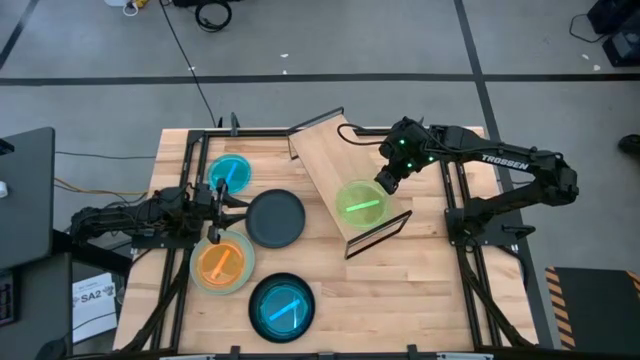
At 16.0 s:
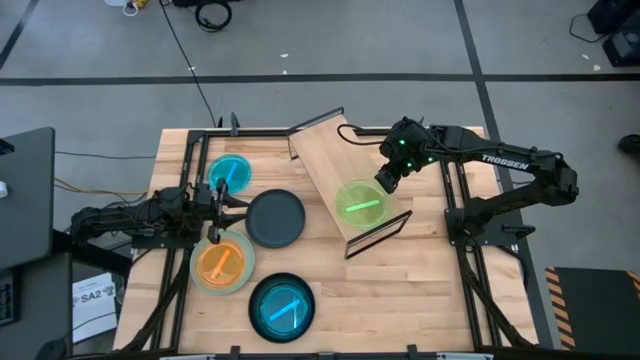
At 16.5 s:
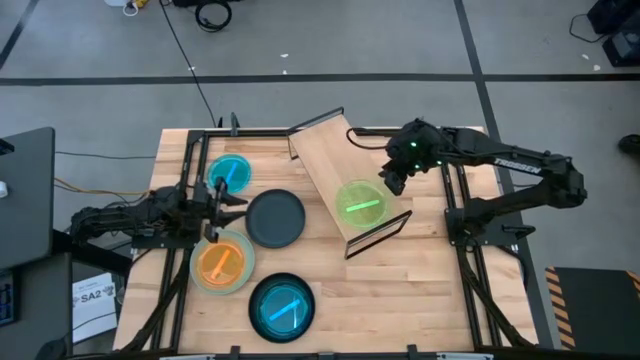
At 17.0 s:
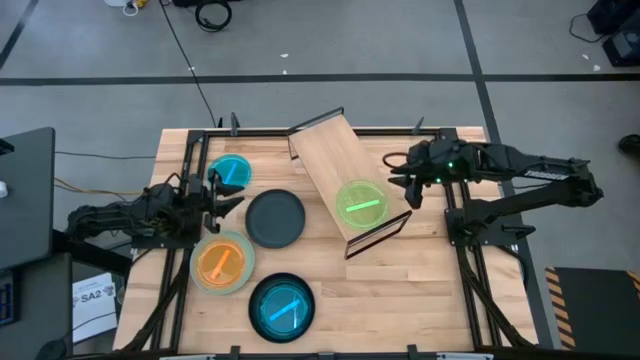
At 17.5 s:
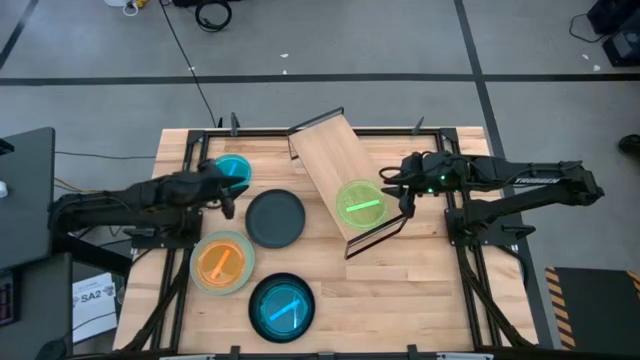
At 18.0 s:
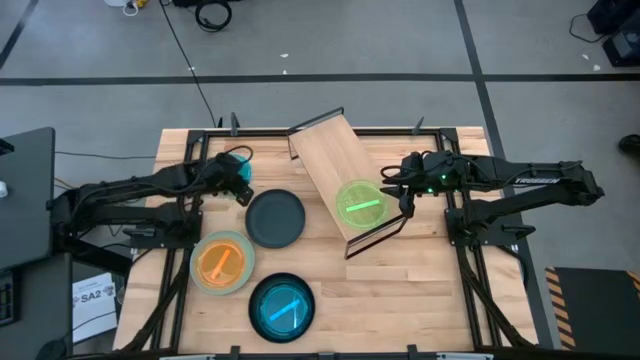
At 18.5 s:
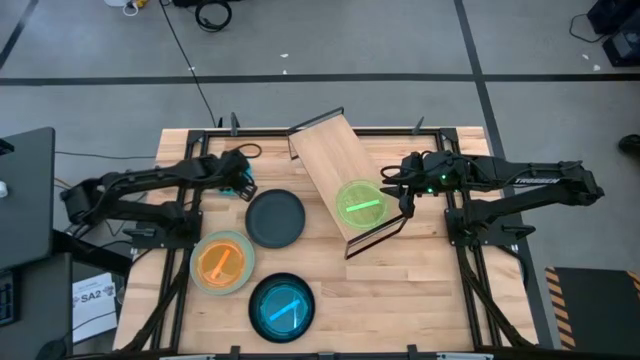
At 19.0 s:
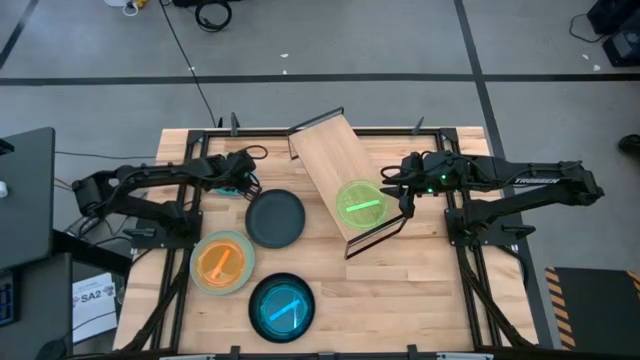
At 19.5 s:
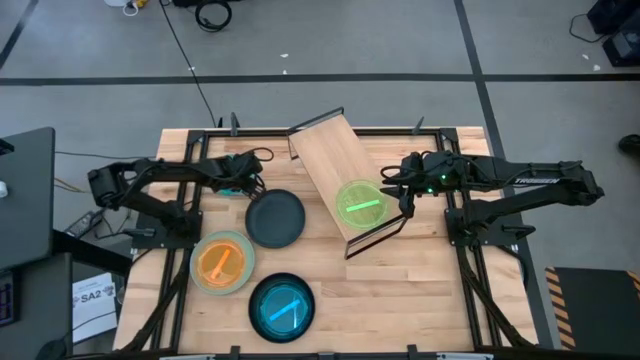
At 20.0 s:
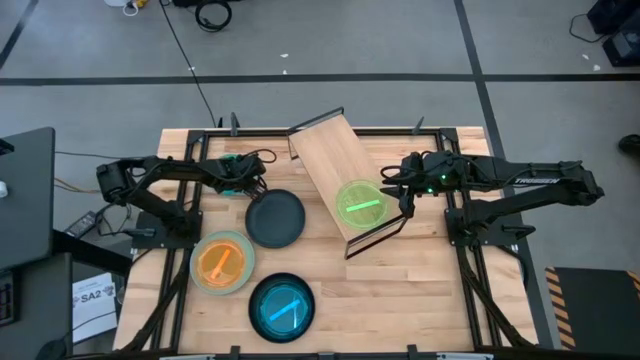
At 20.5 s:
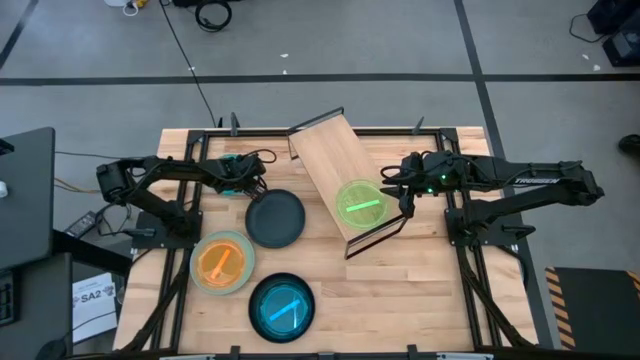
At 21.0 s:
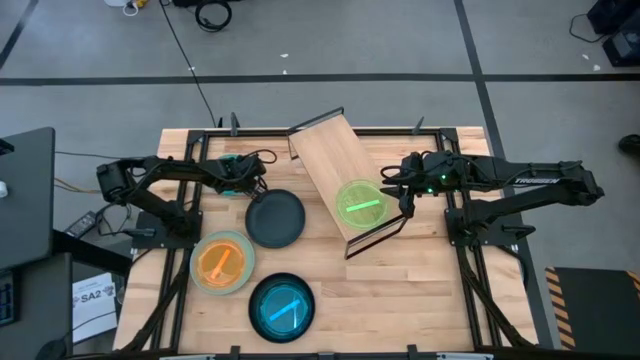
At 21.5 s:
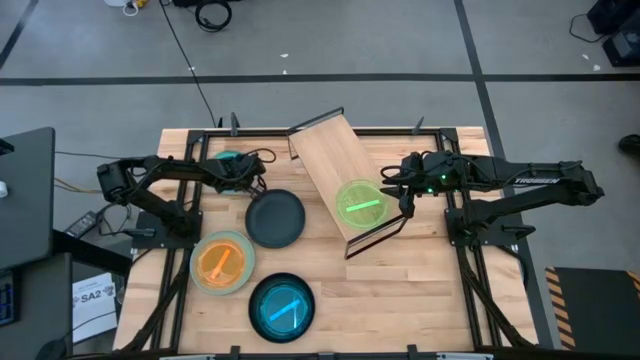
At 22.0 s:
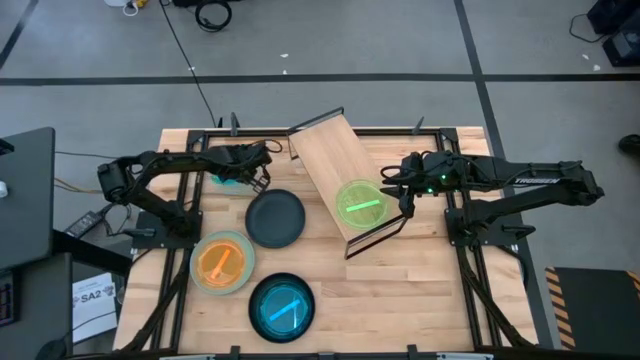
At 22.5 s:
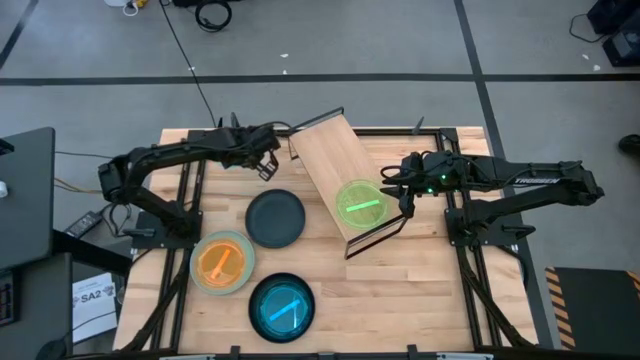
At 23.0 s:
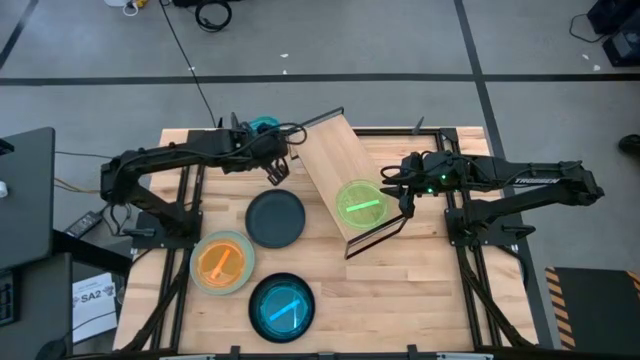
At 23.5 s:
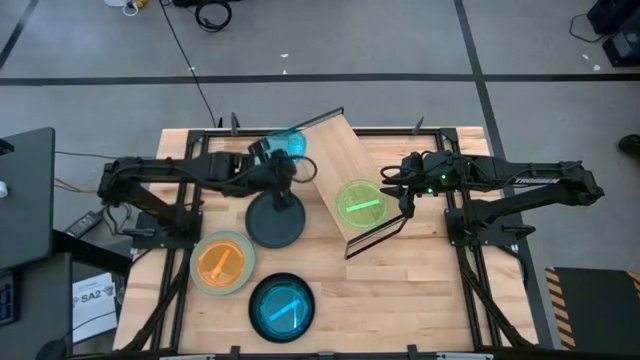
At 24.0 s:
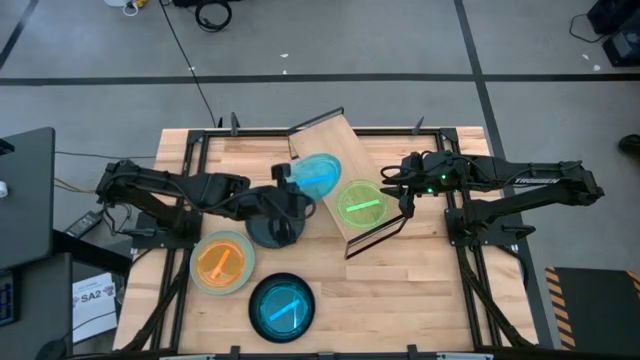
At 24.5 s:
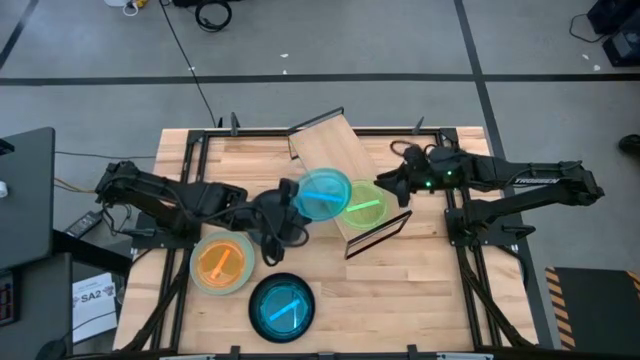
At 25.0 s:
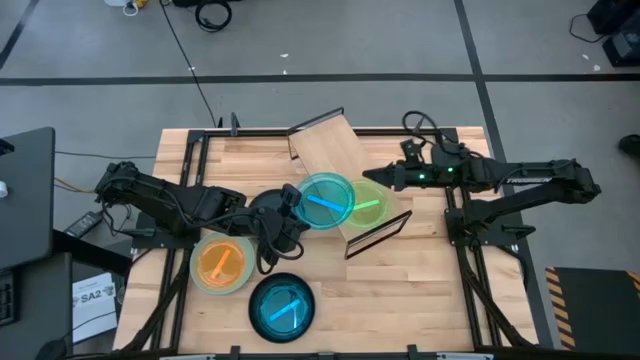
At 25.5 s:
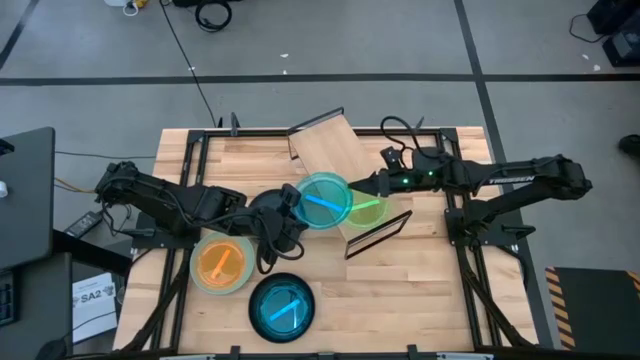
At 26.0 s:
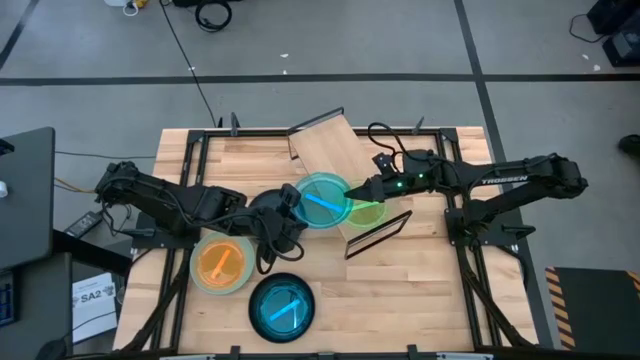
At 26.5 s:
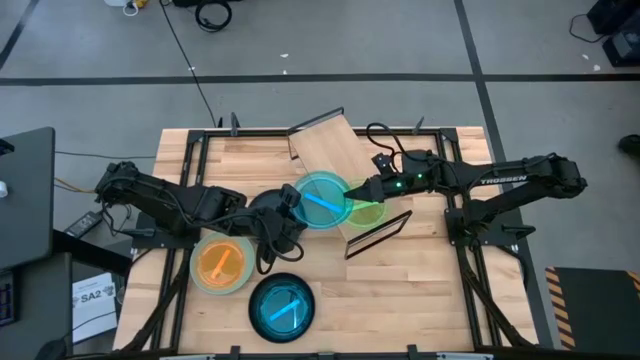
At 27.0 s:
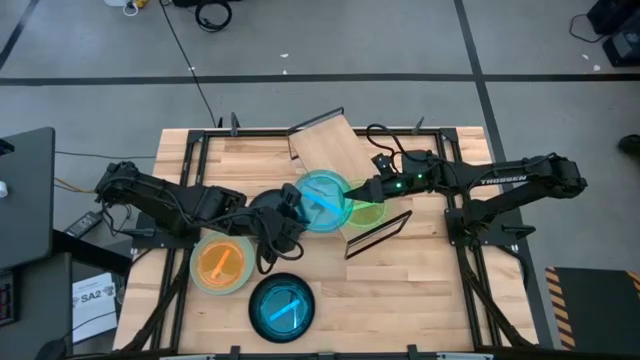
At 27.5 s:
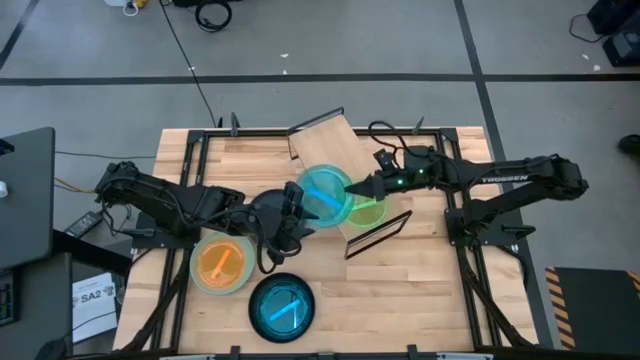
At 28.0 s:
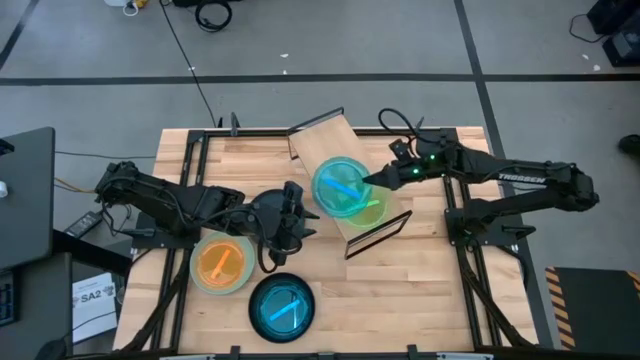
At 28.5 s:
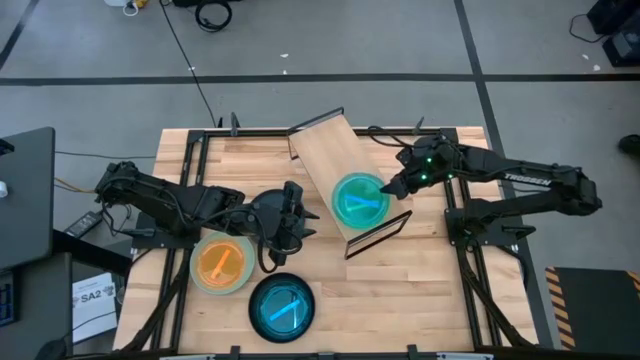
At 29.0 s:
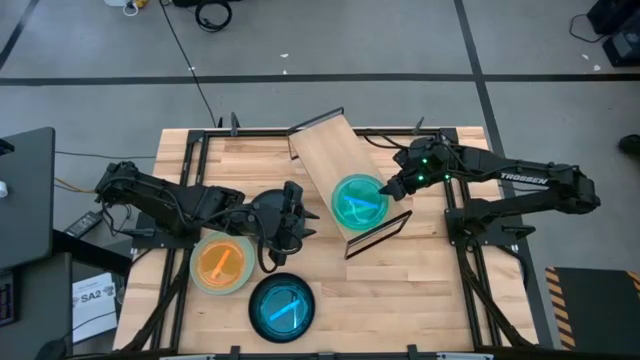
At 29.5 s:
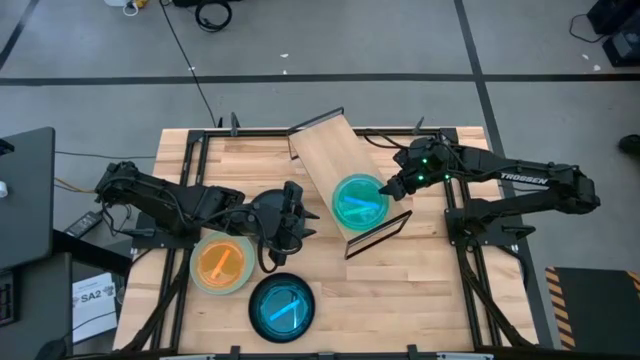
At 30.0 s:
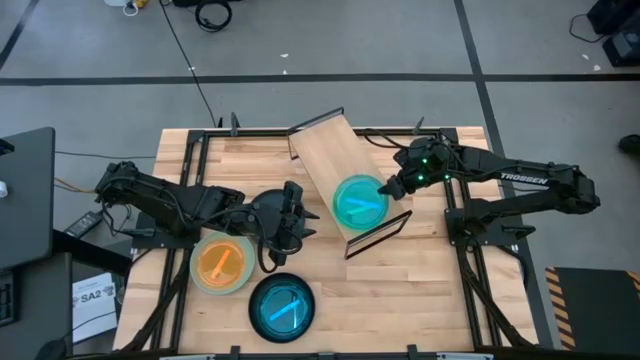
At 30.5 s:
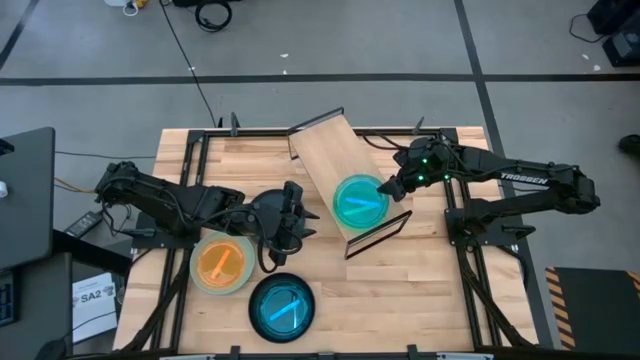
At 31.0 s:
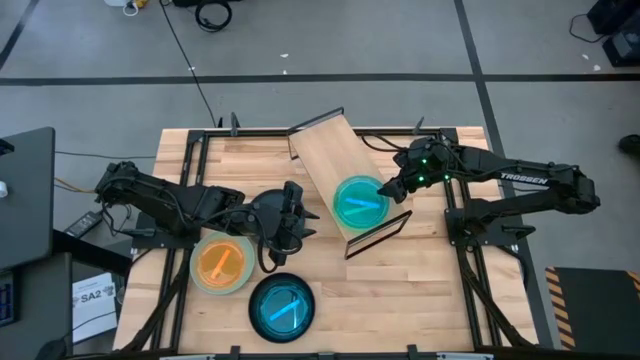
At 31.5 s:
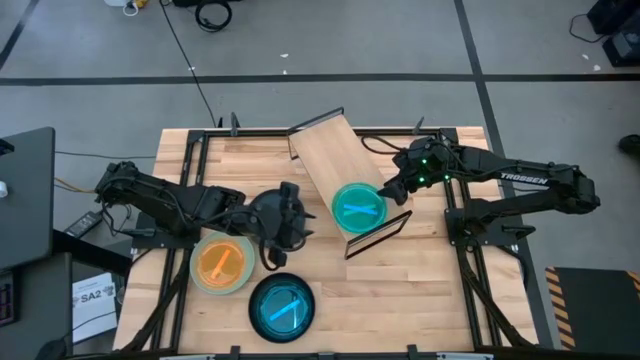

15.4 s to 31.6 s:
Task: Place and stack plates onto a shelf
Stack the top transparent blue plate on top of the transparent green plate on the shelf

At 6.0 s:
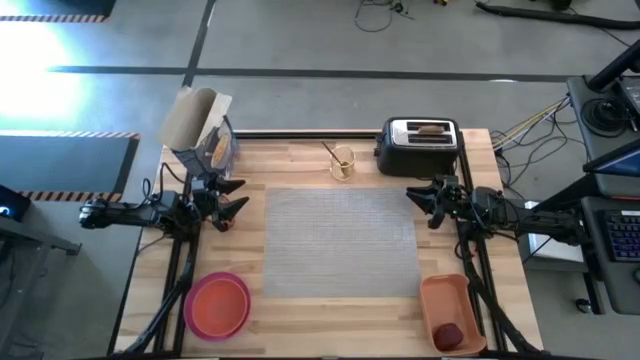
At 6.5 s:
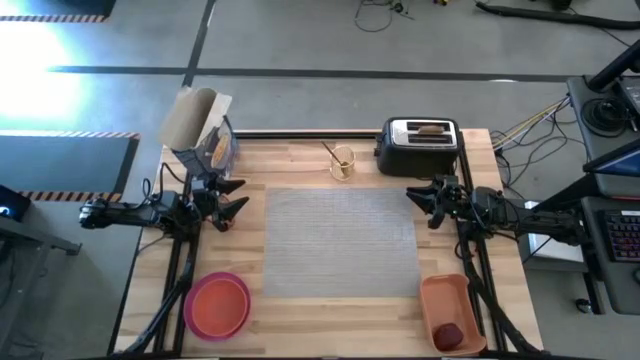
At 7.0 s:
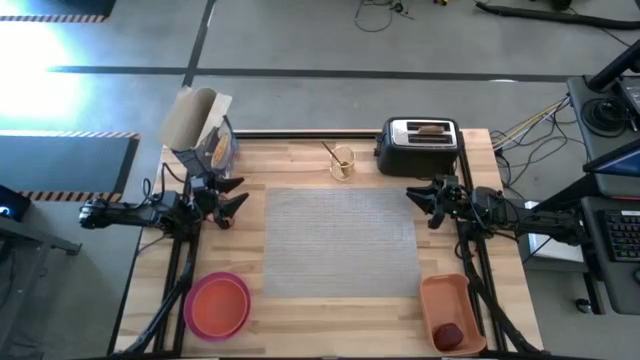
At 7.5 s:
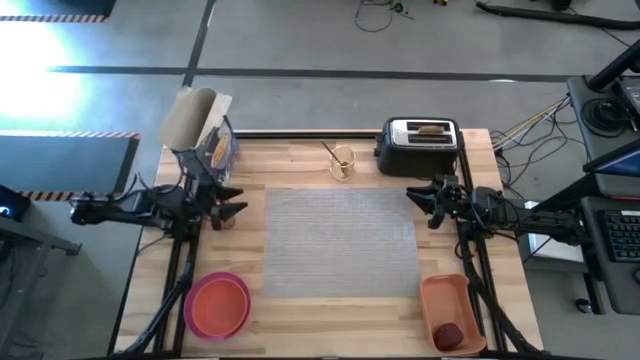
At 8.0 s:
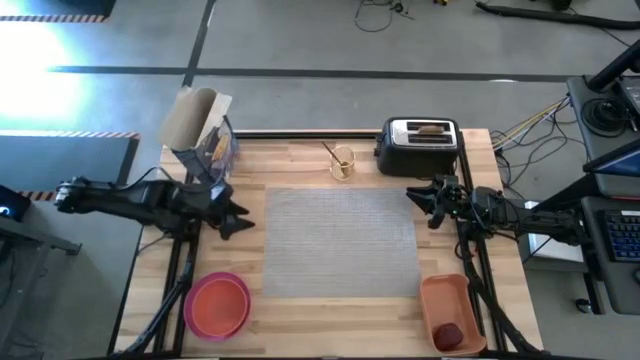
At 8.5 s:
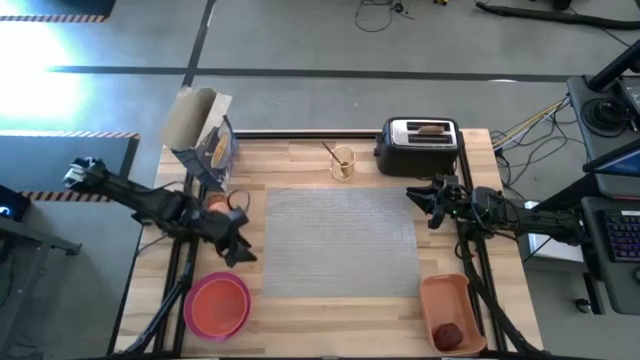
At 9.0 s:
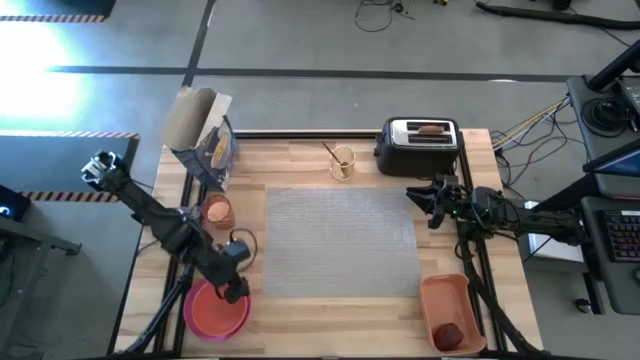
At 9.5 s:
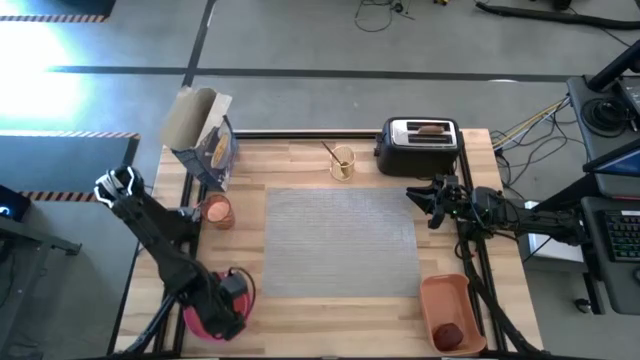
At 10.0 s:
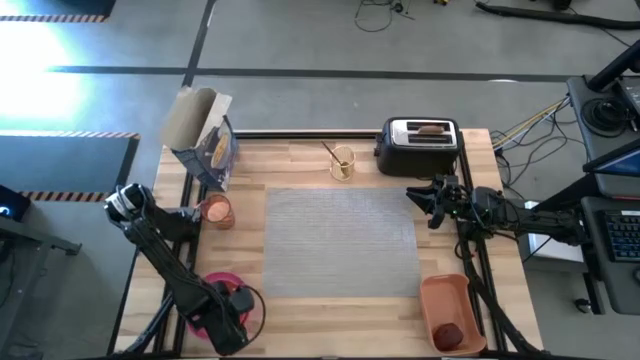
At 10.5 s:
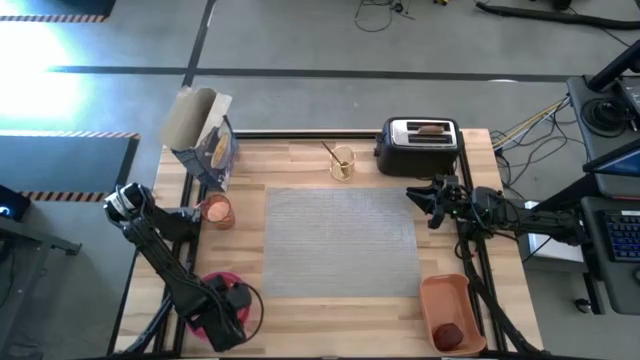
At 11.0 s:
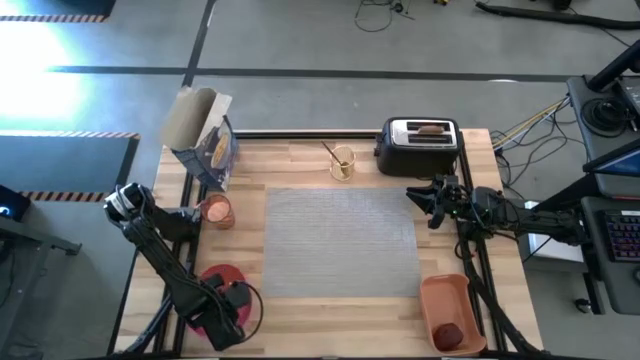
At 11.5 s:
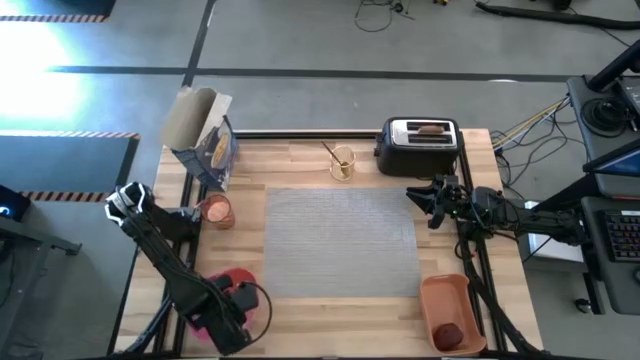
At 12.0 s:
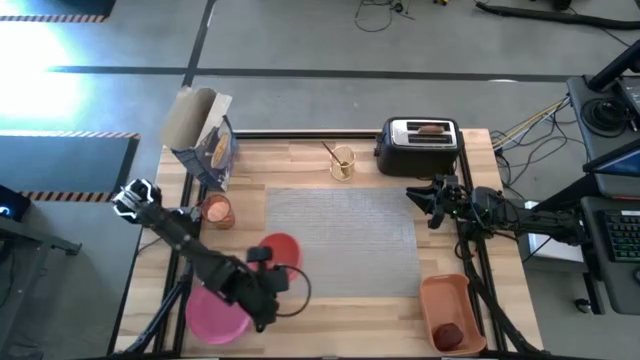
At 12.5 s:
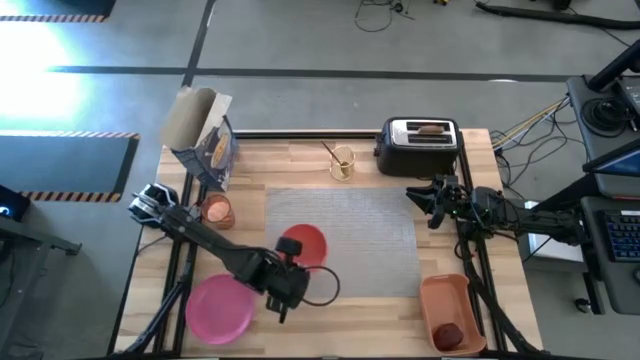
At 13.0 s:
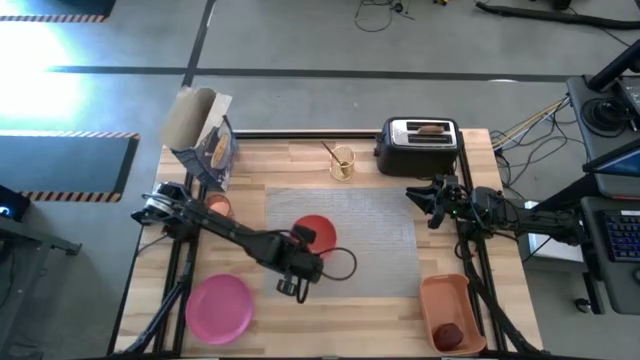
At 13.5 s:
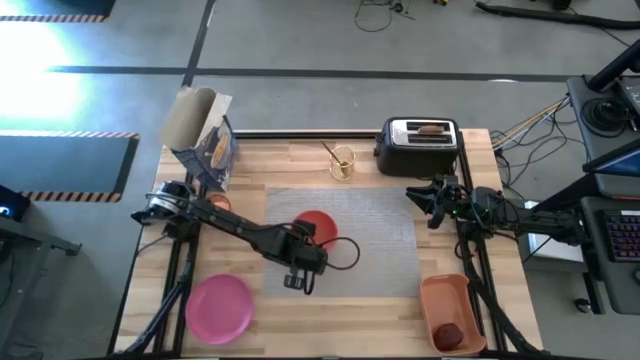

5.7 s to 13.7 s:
Task: Arrange a breakfast setting
Put the orange bowl on the gray tablemat
